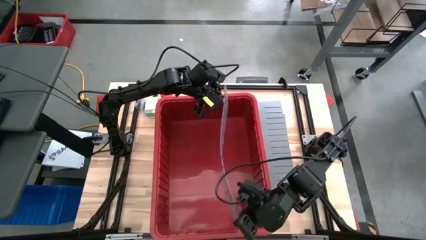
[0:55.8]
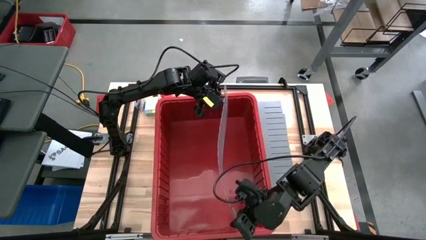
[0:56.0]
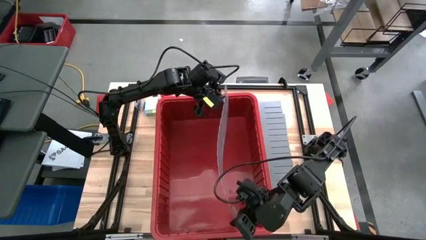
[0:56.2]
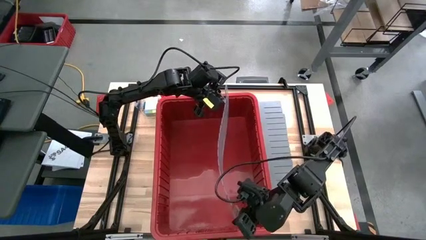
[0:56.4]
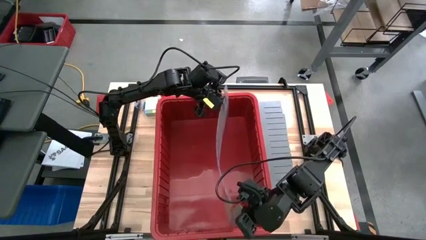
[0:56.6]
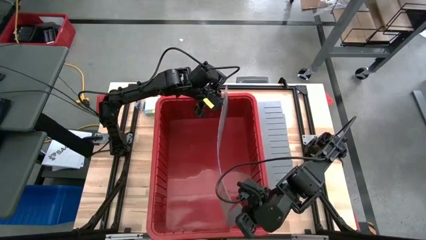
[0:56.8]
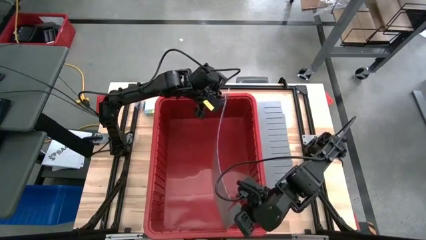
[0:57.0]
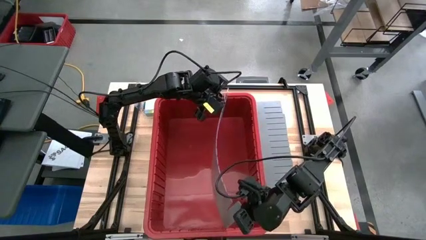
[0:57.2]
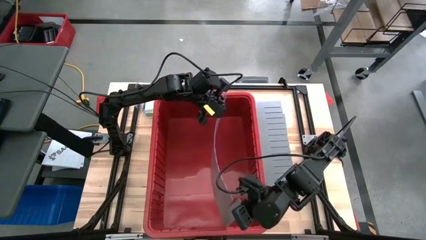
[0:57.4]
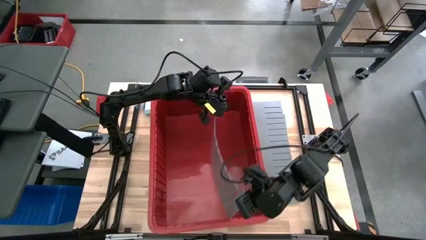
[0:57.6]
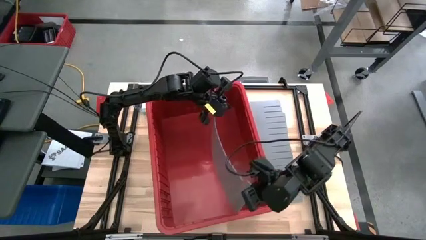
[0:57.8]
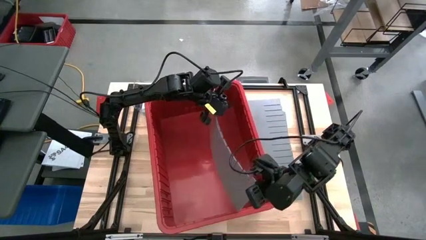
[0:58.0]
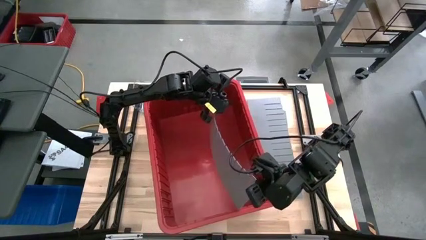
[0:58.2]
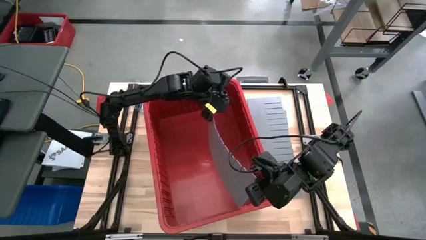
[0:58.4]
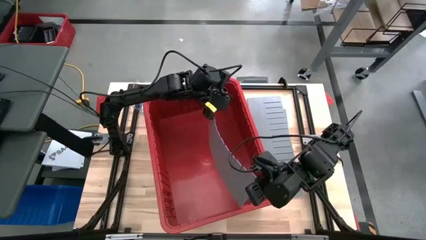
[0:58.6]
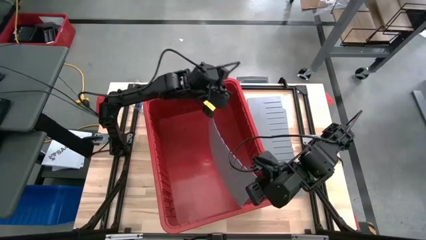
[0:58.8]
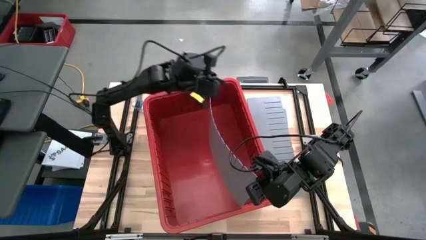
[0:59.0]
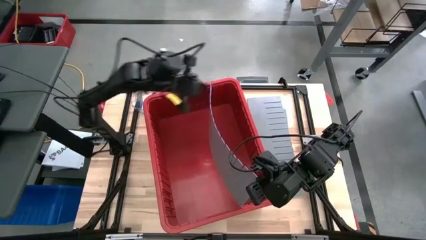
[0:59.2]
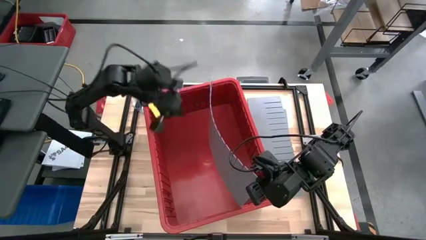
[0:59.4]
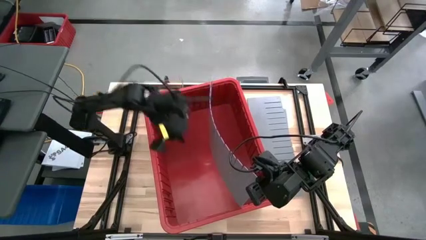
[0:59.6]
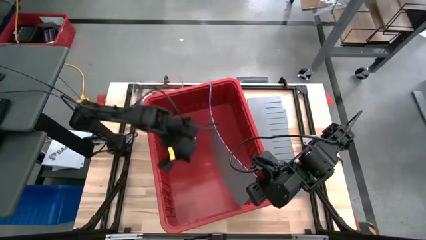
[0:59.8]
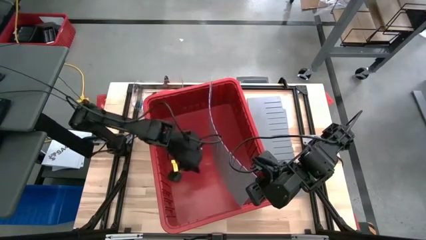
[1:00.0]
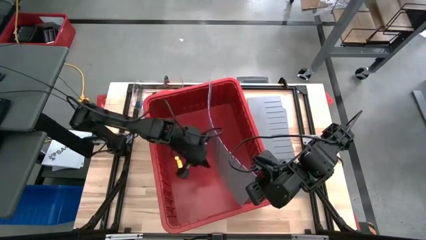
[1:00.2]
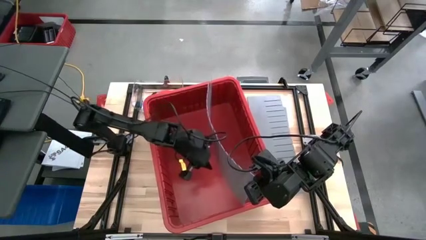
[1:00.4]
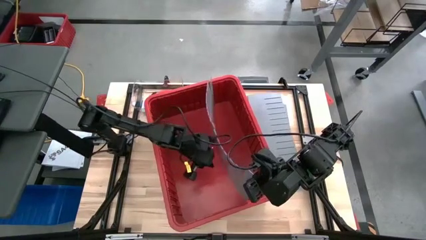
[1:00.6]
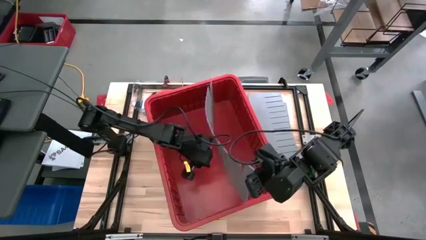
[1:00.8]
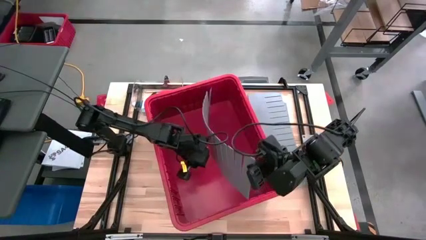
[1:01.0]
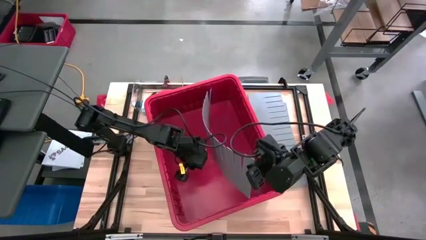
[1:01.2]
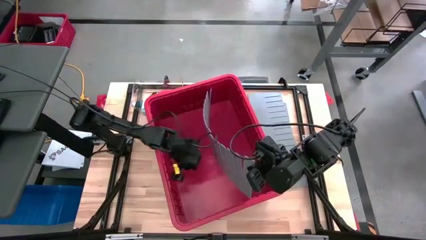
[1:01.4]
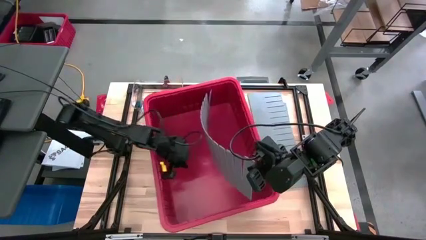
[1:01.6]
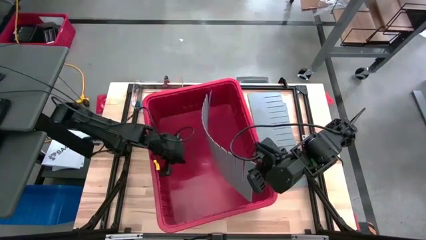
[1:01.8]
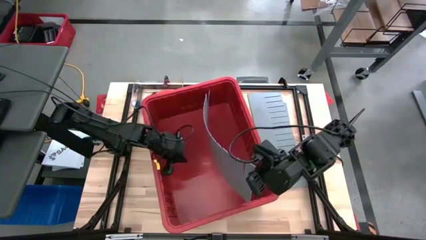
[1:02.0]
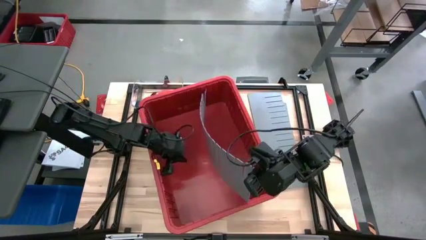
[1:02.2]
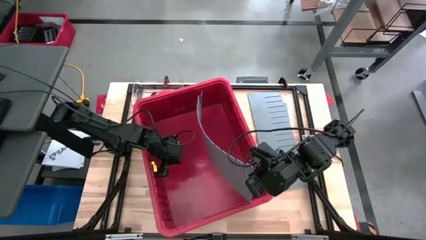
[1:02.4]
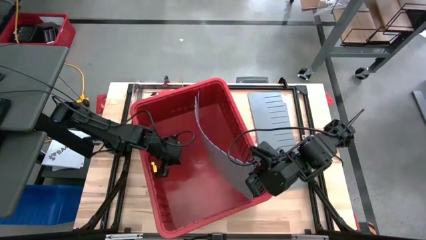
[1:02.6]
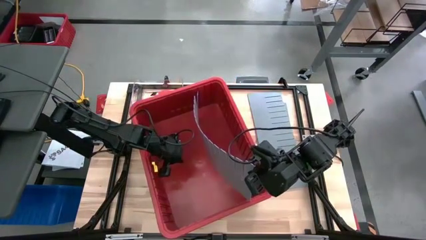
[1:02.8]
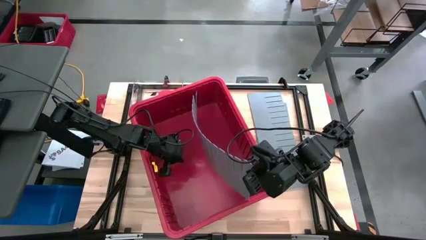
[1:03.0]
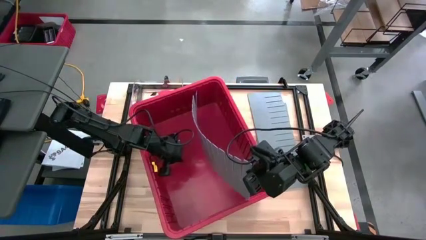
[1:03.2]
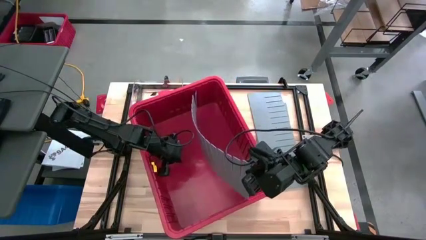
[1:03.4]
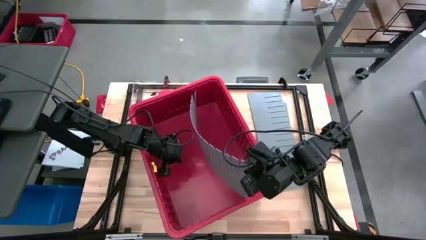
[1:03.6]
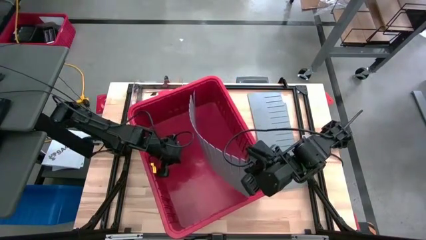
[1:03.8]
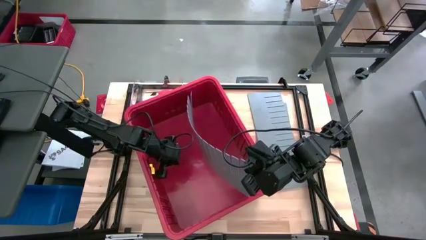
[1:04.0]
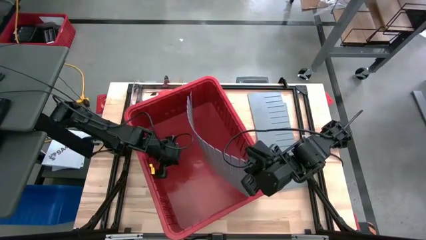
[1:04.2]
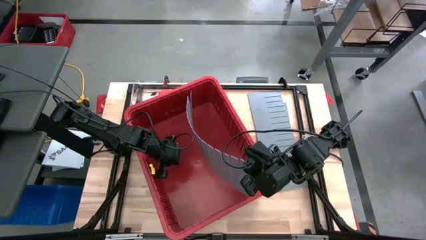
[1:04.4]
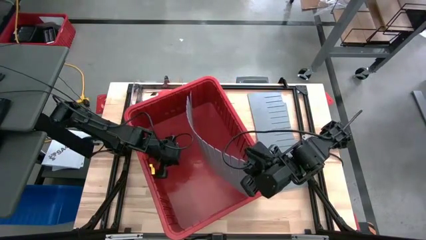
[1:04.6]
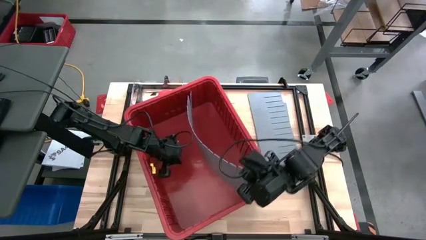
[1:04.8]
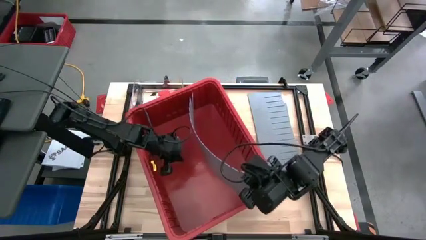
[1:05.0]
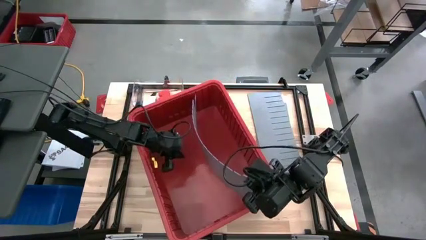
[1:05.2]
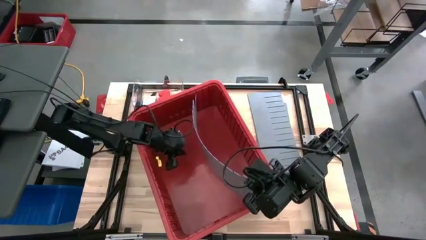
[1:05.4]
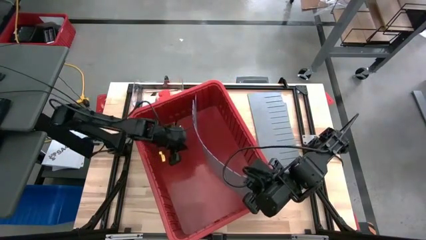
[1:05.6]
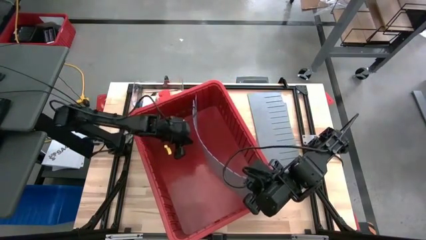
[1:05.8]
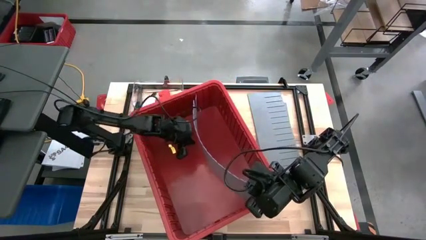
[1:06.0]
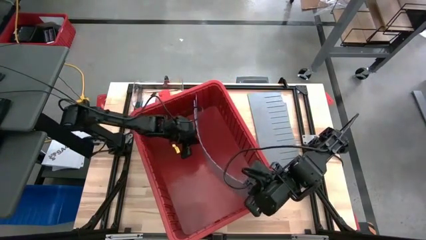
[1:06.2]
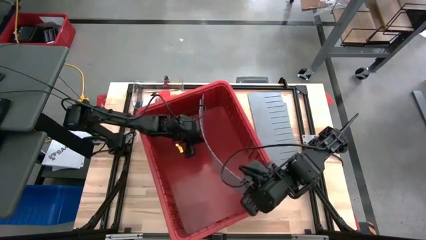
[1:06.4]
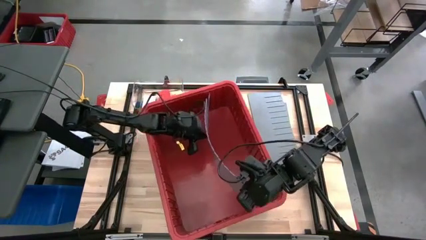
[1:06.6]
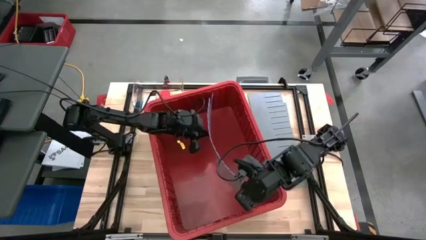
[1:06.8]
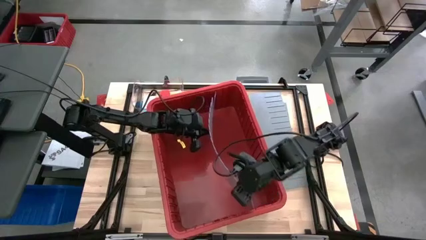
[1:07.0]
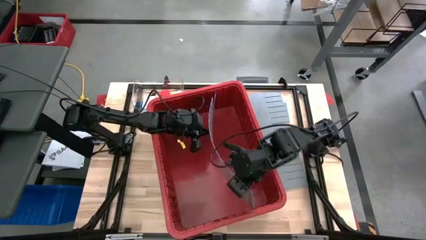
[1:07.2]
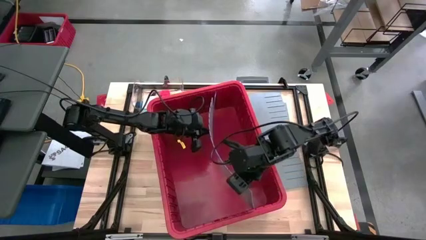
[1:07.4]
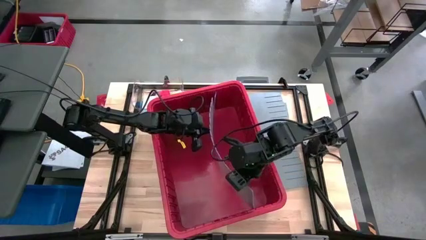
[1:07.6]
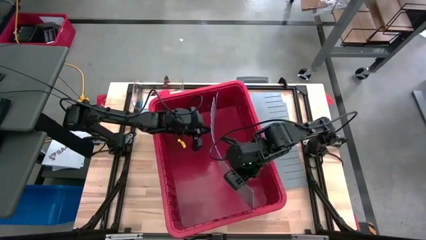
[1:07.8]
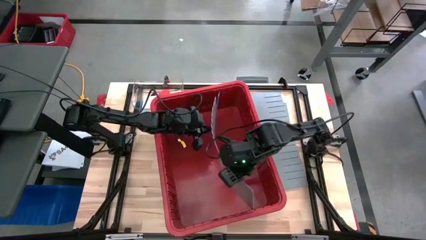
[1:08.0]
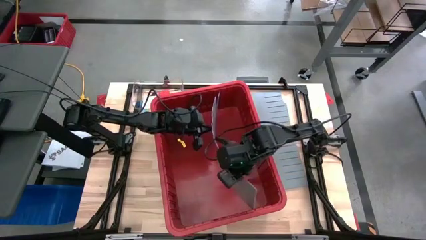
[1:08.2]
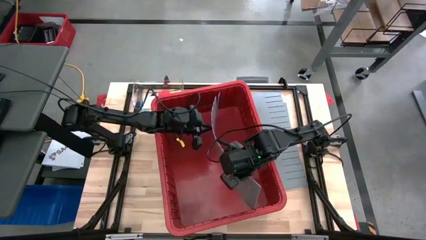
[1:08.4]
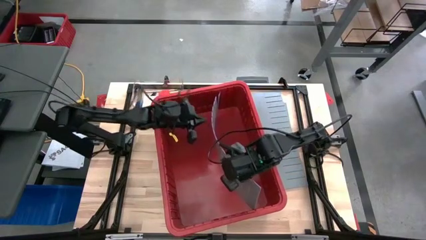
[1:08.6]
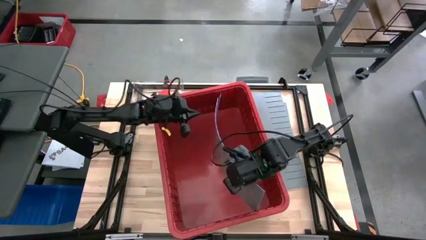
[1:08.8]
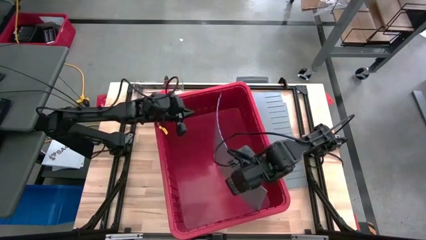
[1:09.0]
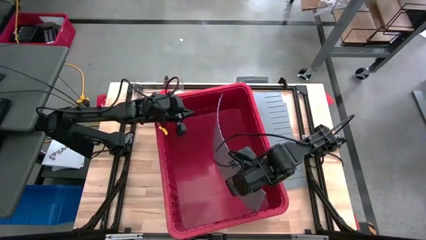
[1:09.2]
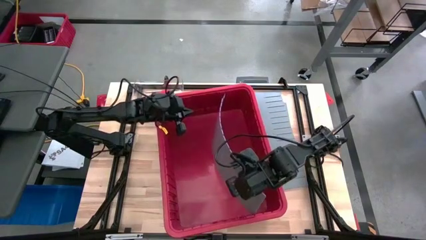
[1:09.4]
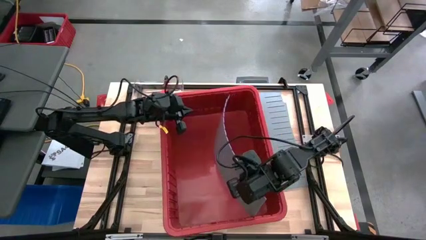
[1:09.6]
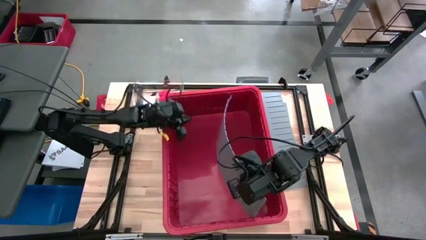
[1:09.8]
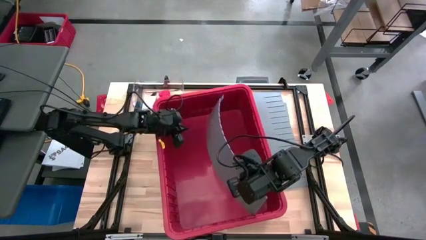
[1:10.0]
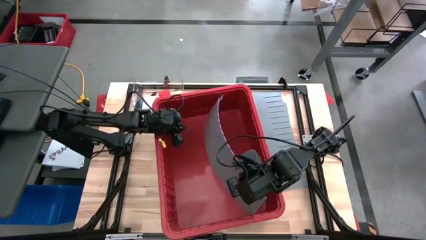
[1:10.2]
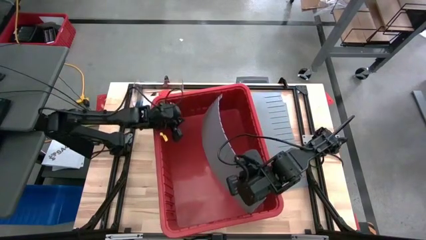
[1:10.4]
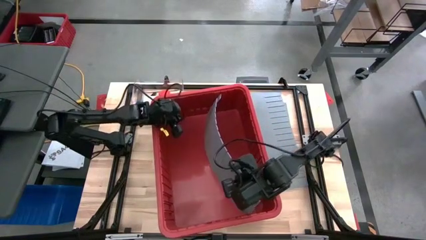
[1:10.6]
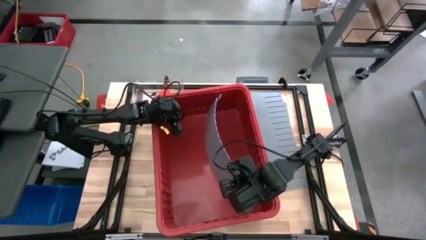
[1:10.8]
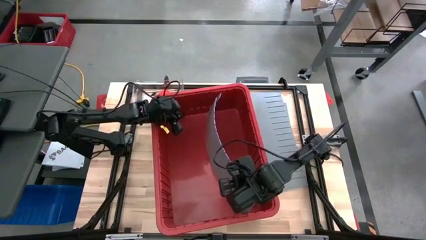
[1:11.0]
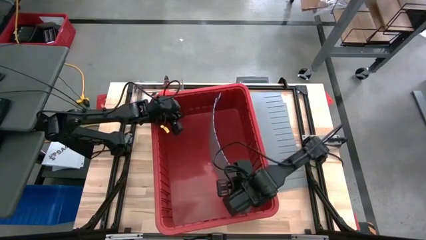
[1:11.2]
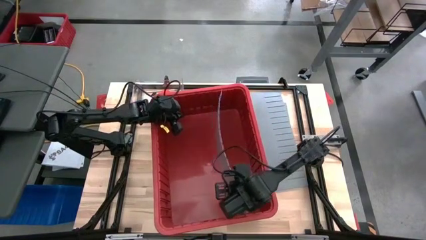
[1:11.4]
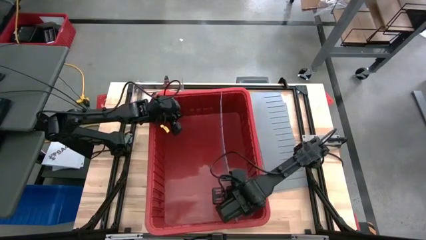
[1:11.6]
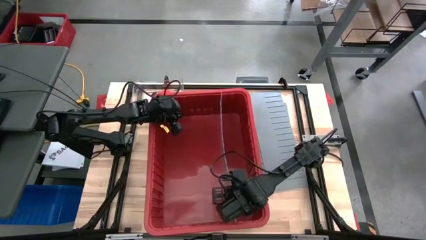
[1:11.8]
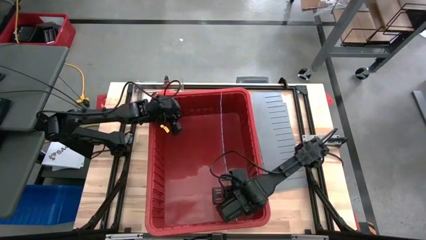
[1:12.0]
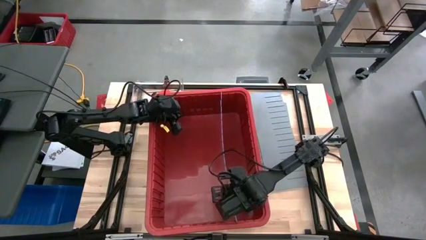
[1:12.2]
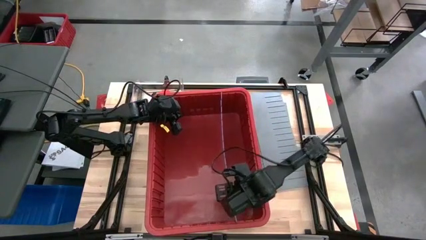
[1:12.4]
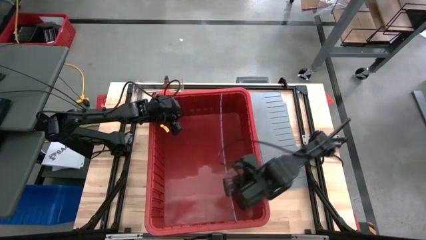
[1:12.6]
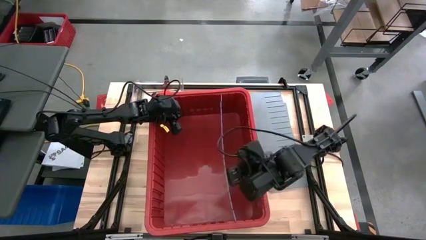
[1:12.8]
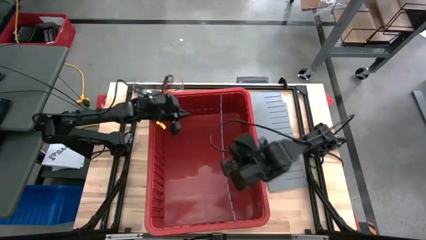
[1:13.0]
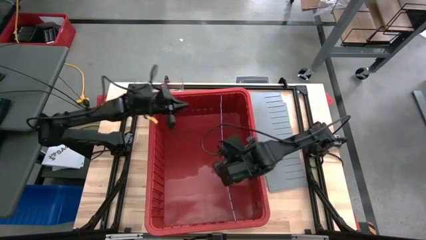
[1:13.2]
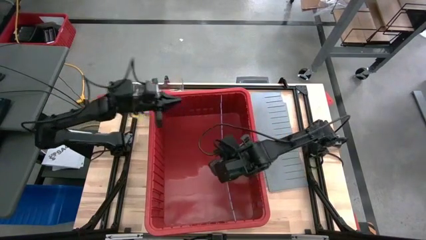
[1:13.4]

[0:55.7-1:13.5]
Task: Sort blocks
Assemble the bin divider into the red bin
